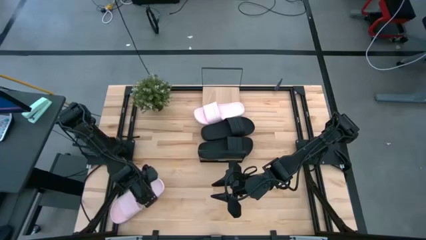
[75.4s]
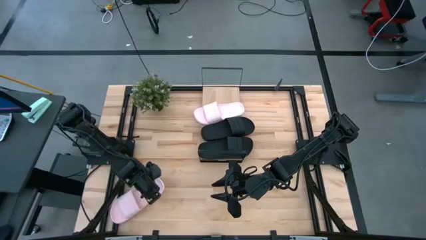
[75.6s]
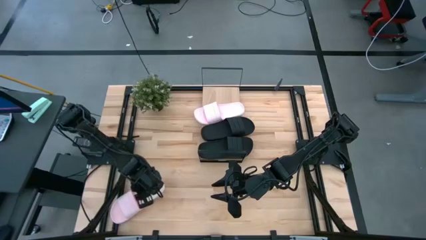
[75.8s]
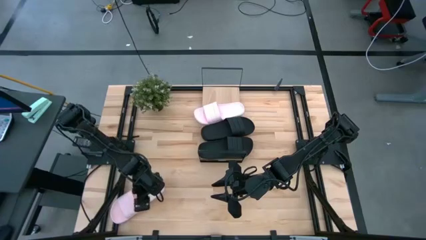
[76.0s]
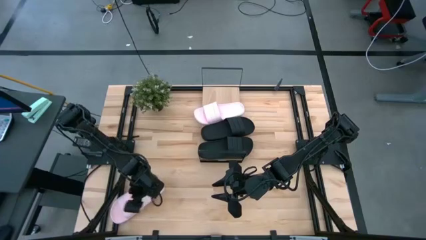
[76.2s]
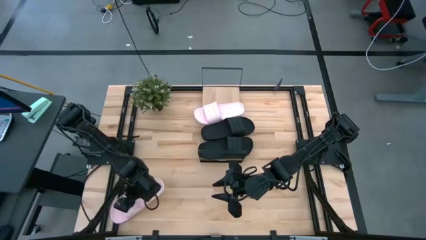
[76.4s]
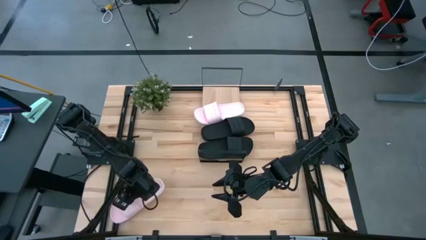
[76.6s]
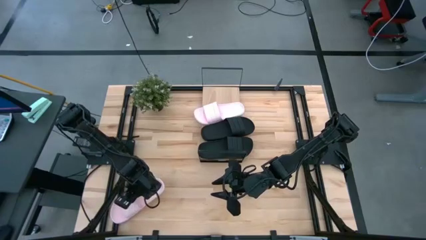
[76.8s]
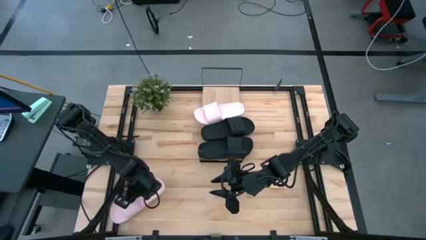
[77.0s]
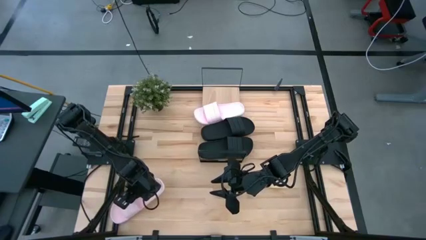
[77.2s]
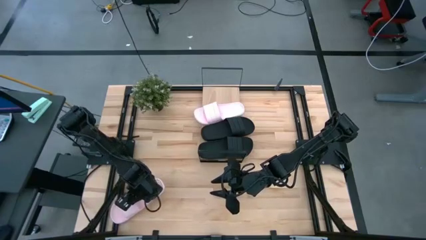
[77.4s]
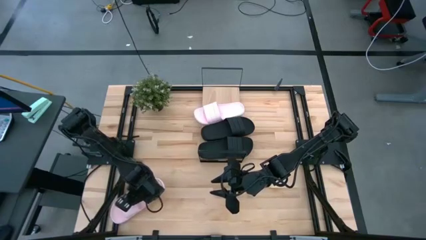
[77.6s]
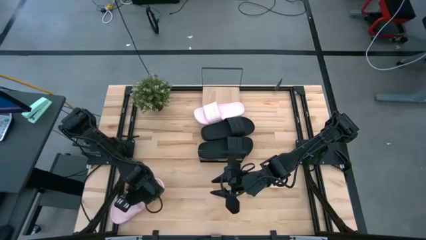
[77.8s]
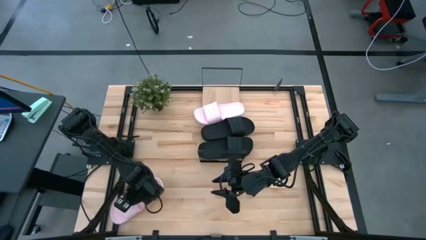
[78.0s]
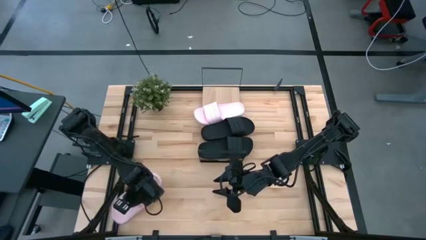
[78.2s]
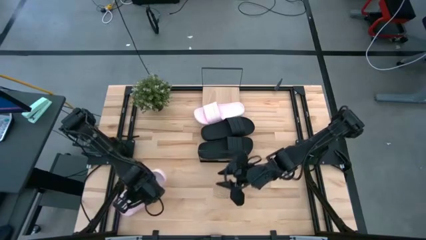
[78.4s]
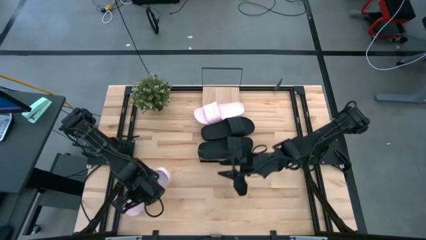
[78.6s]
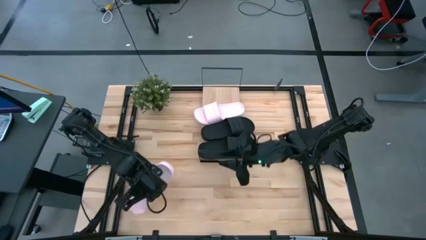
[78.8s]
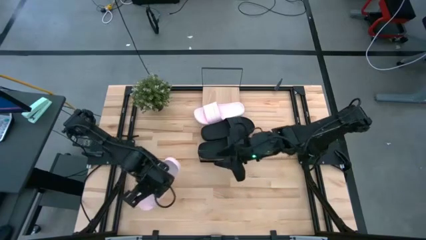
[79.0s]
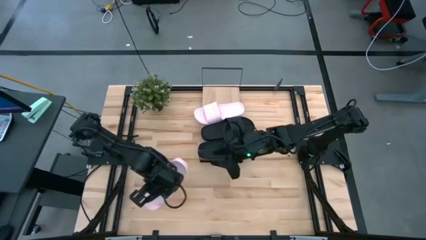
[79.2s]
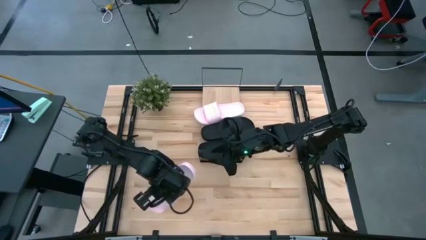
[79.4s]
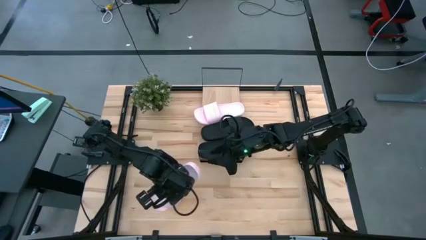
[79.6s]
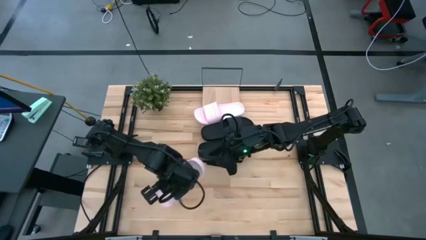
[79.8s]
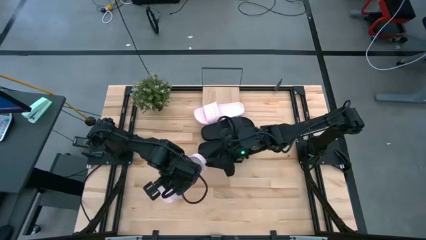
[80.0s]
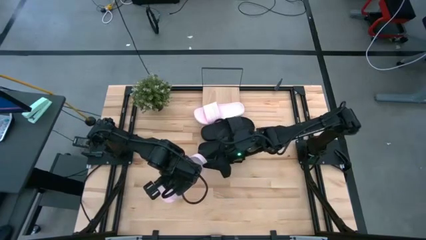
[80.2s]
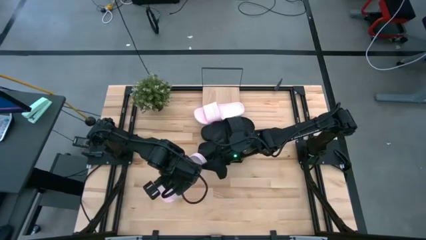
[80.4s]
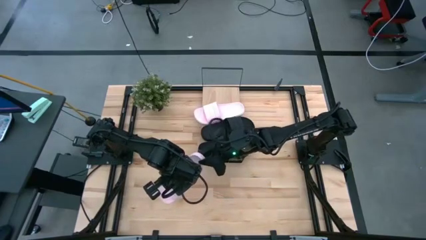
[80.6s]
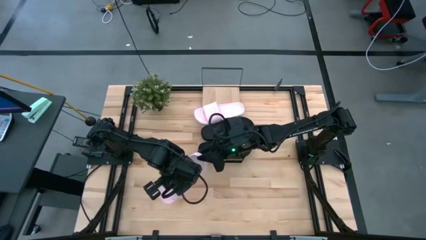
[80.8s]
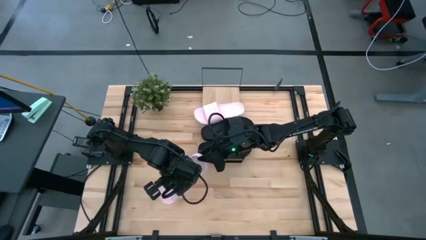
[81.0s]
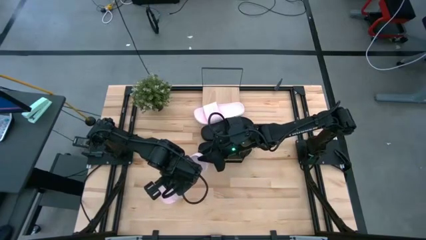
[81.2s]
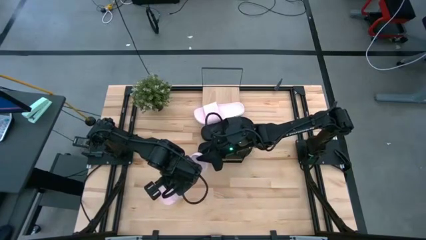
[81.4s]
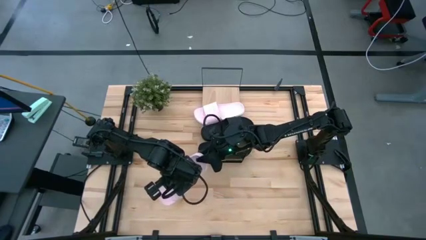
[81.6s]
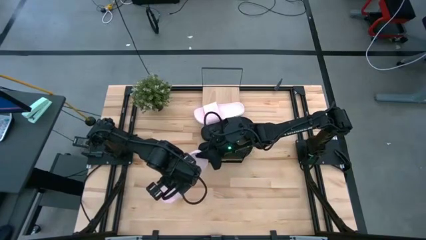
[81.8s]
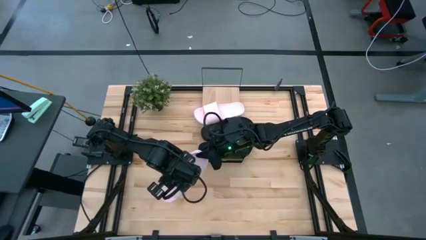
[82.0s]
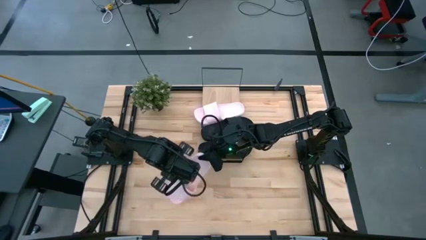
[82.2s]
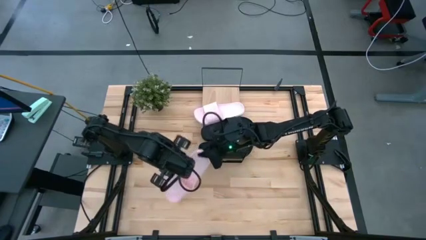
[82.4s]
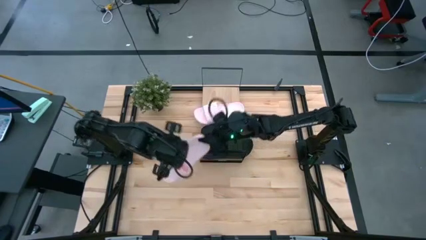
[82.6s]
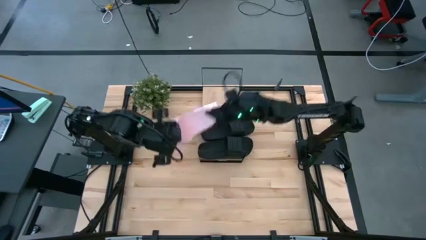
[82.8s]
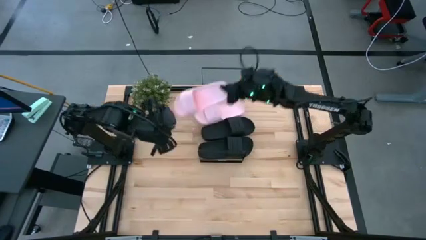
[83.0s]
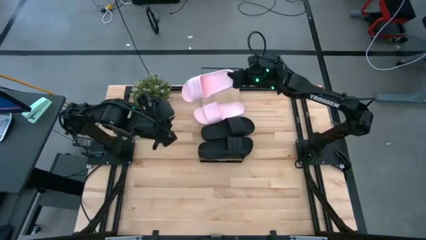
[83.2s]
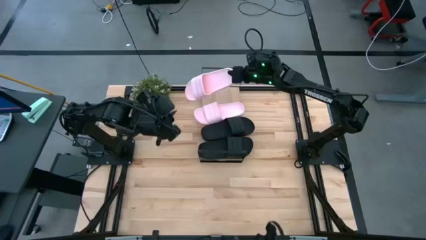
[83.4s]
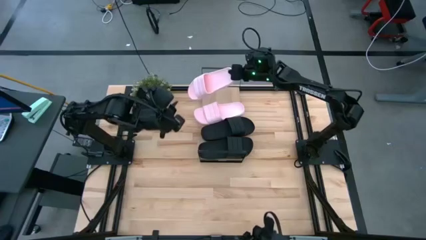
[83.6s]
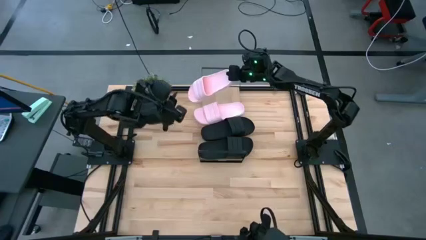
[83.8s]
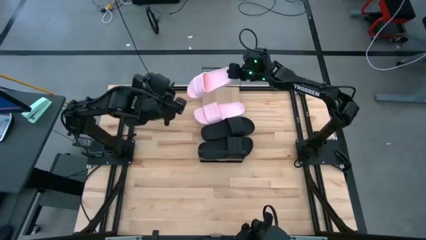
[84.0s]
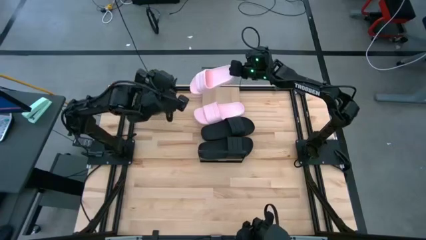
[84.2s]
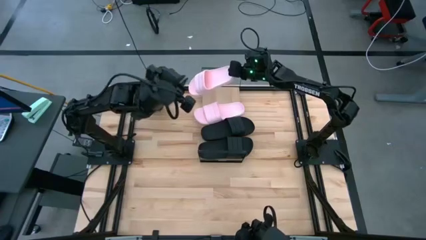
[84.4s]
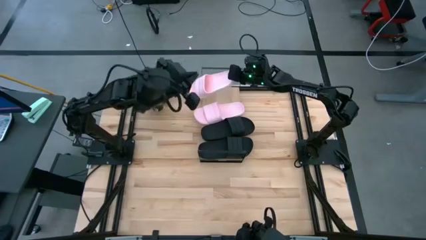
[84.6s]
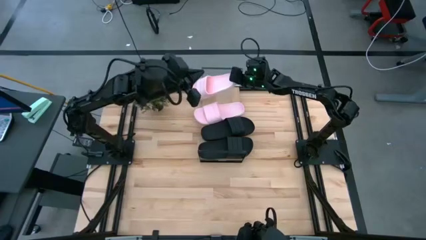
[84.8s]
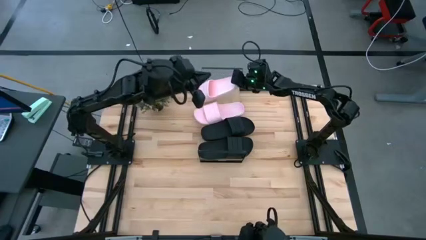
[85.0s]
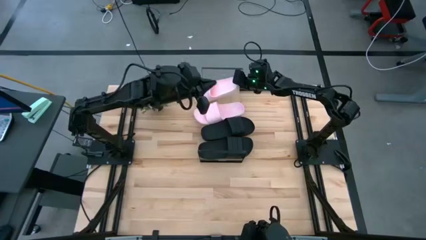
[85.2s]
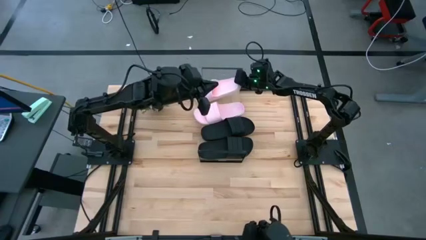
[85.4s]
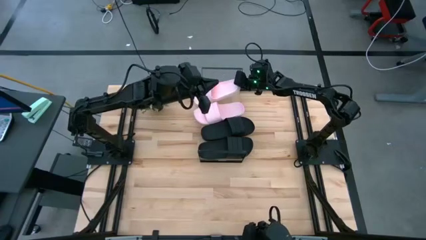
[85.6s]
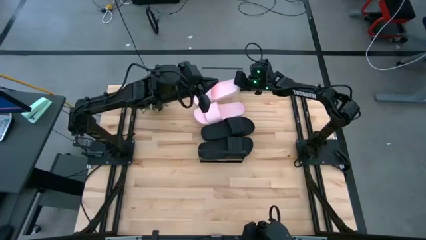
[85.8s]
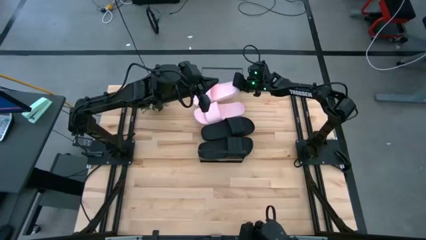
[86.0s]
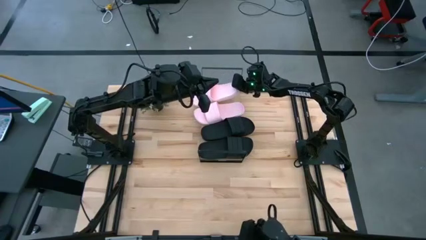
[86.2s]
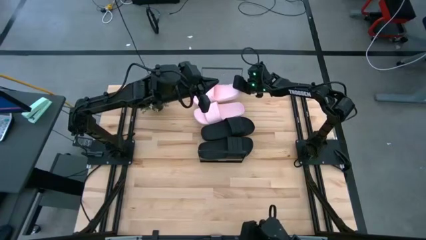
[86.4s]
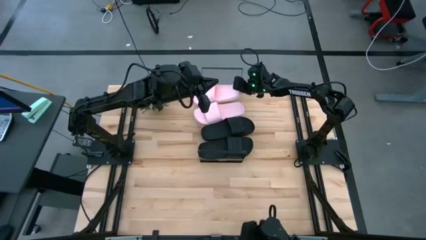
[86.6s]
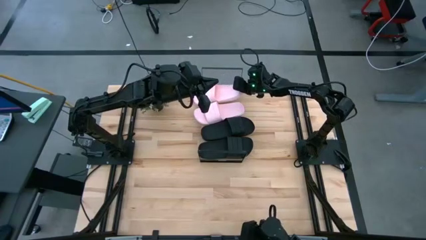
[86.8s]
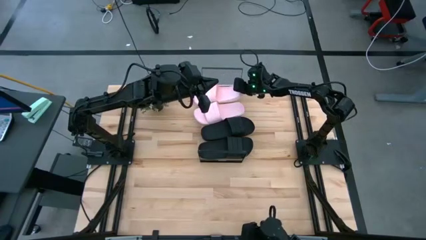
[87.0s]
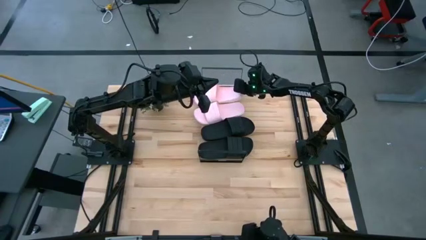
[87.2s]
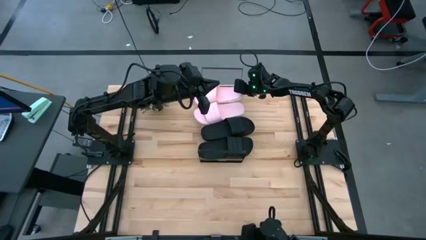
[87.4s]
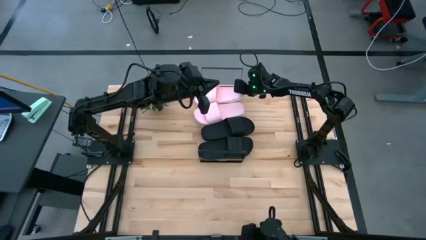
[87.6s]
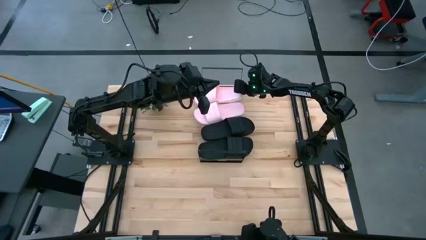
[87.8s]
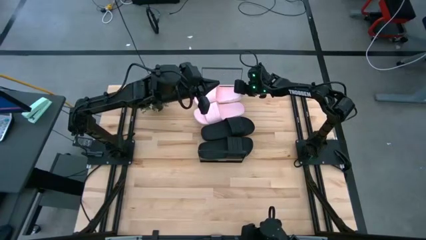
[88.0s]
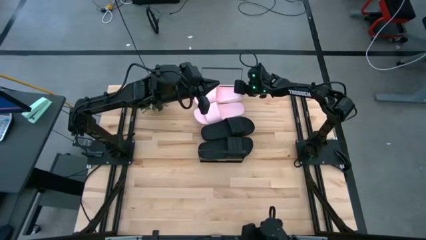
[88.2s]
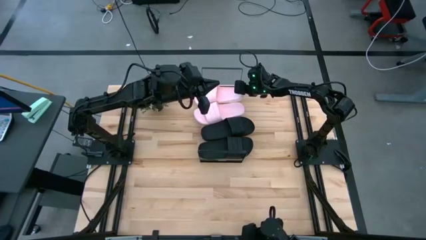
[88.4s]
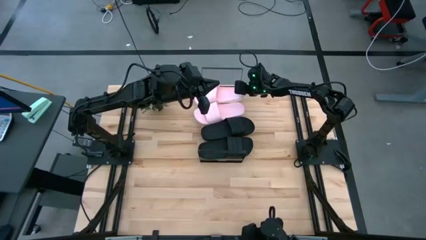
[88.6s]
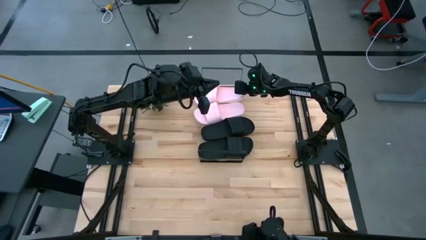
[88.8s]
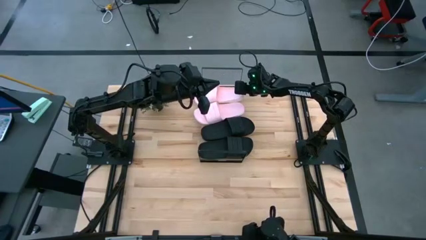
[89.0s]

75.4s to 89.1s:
Task: Pick and place slides into the shelf
Put the pink slipper on the shelf

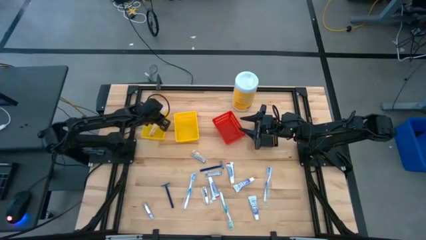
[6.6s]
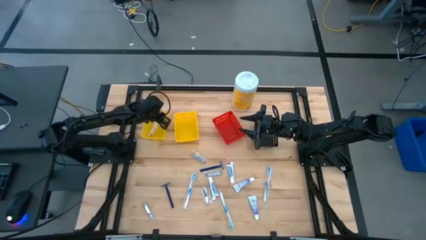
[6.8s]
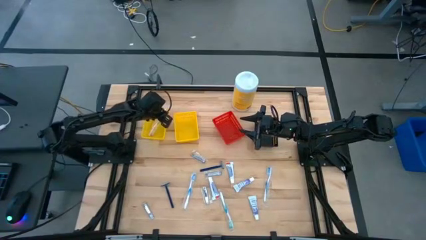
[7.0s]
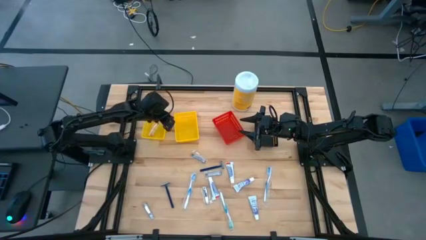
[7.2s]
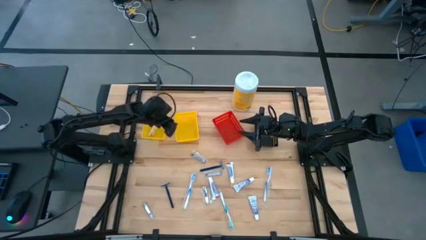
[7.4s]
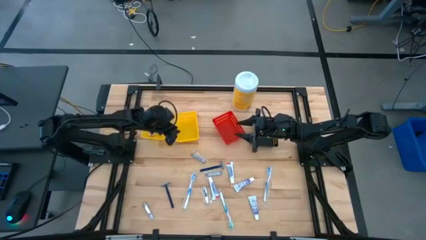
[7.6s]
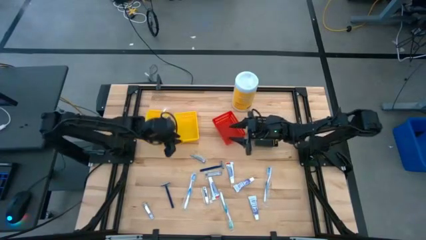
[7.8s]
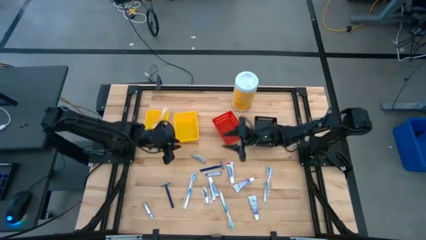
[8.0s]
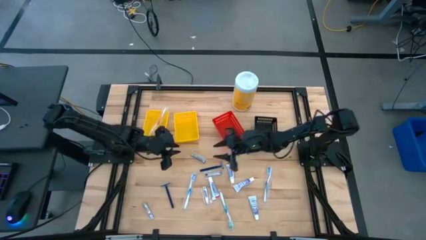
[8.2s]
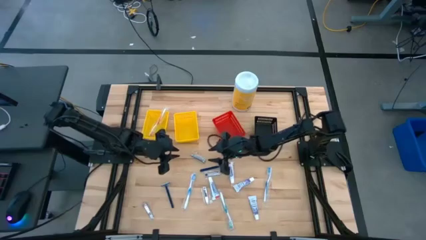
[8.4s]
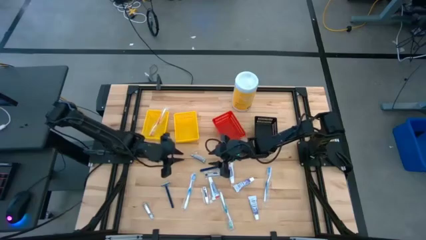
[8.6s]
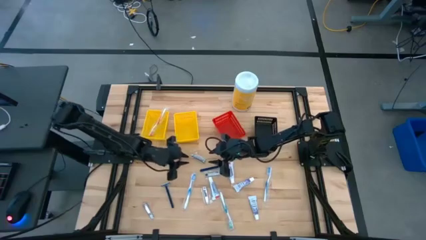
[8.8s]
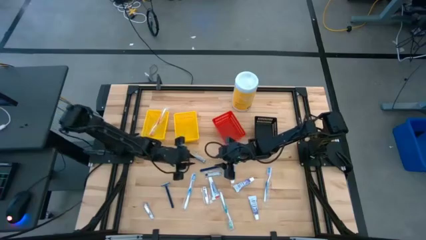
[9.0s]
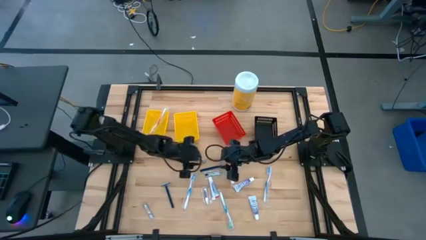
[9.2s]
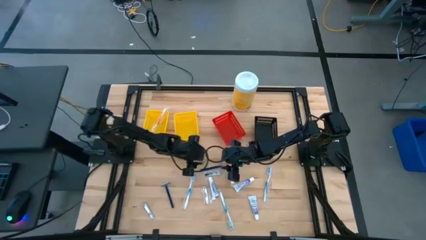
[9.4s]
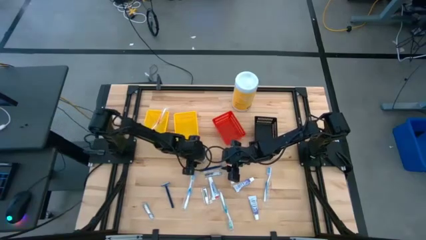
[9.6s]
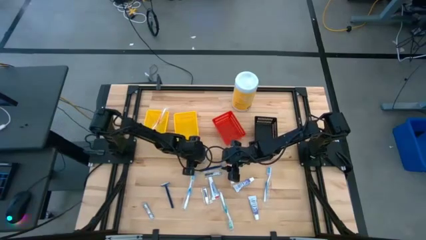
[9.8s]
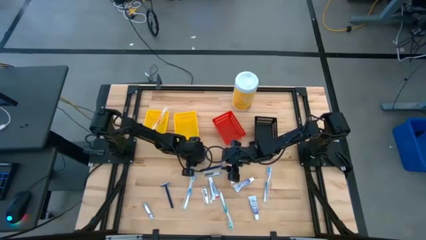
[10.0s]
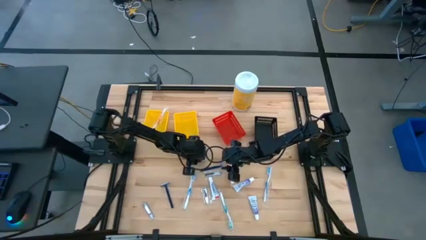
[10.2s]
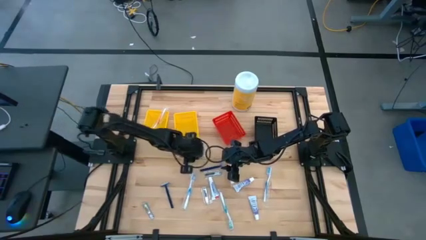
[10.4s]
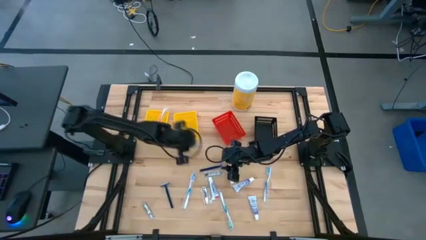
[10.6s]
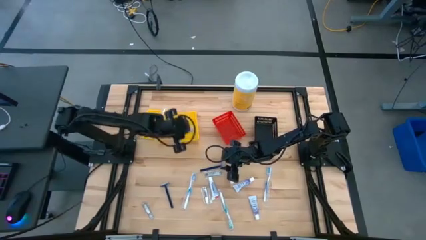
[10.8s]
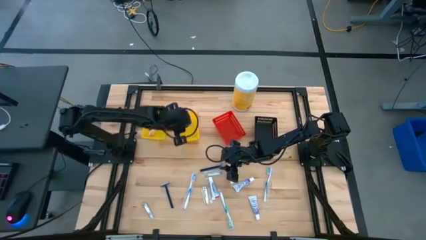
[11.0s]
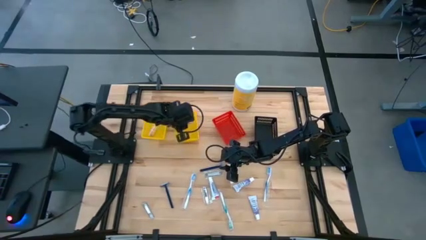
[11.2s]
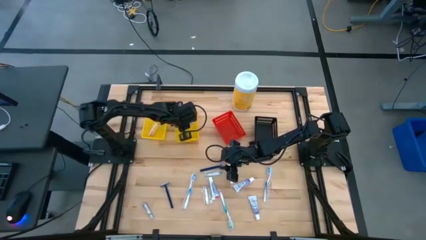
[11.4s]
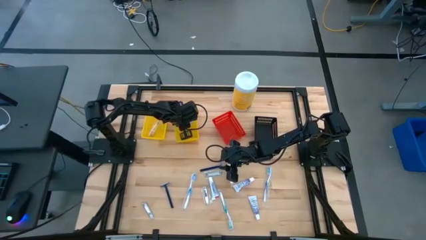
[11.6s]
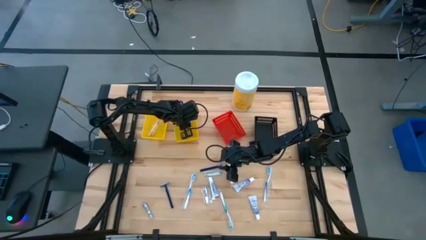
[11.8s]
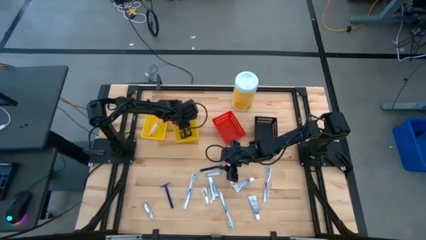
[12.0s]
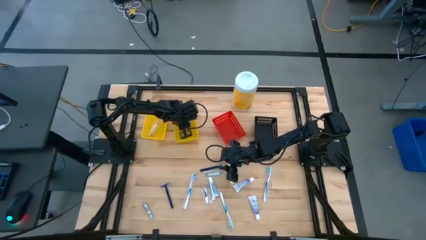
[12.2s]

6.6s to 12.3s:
Task: Pick & Place Travel size toiletries
Put the silver nail cutter into the right yellow bin
